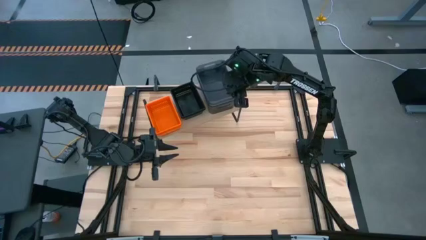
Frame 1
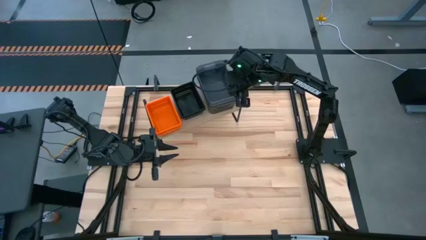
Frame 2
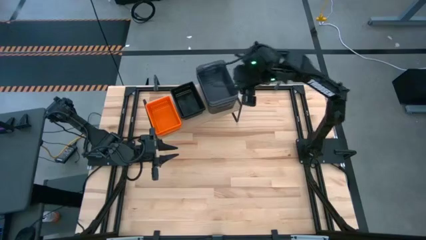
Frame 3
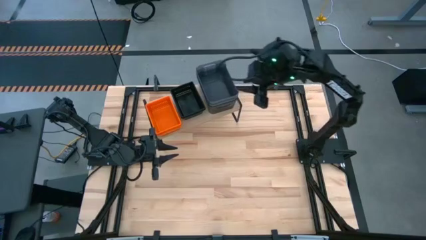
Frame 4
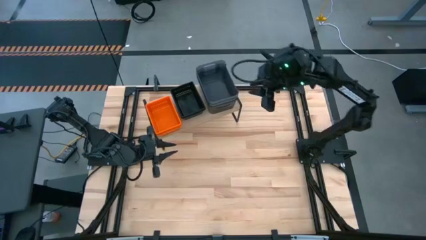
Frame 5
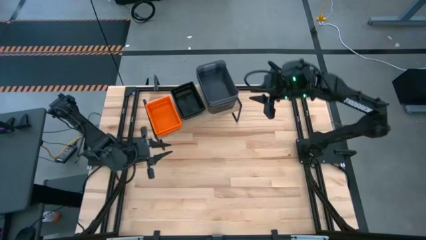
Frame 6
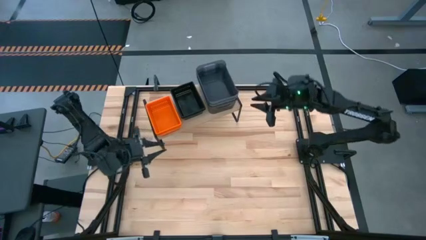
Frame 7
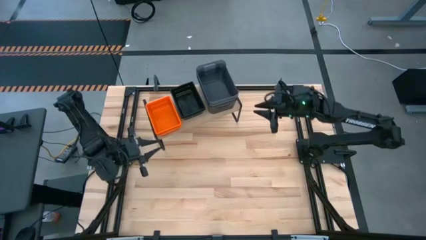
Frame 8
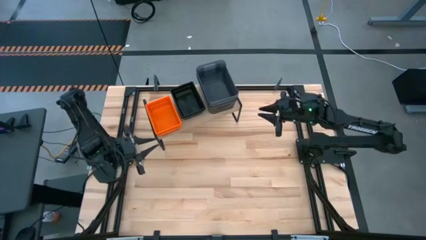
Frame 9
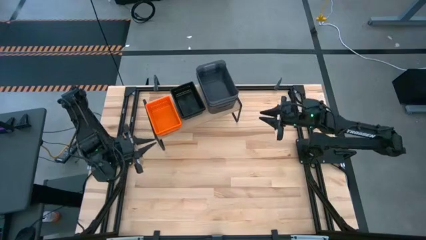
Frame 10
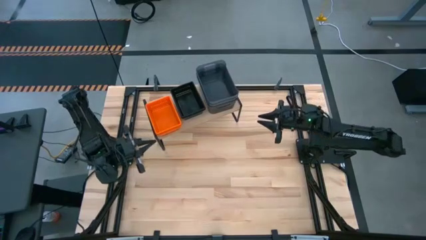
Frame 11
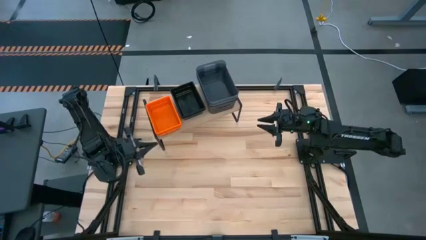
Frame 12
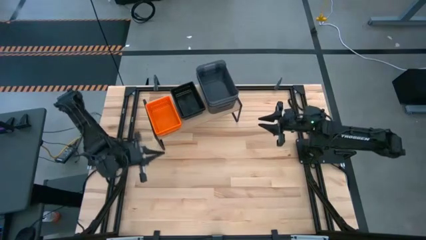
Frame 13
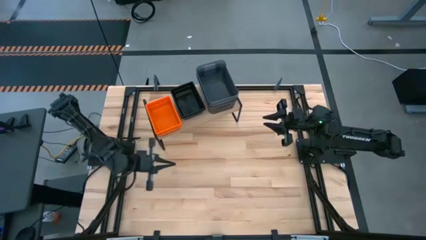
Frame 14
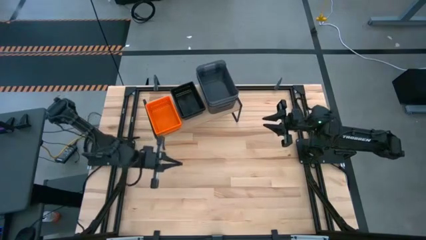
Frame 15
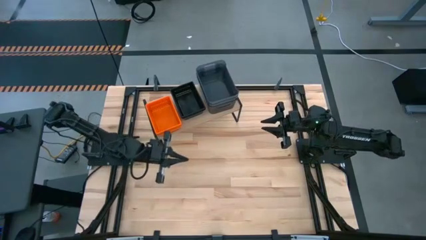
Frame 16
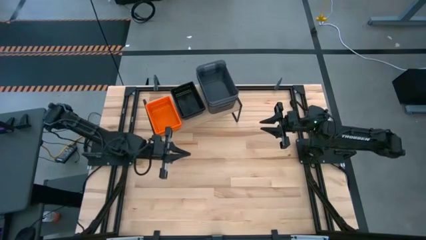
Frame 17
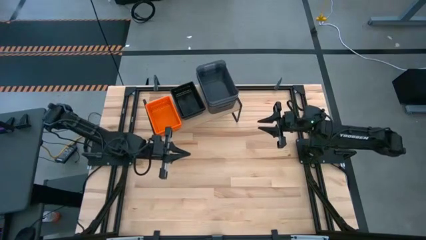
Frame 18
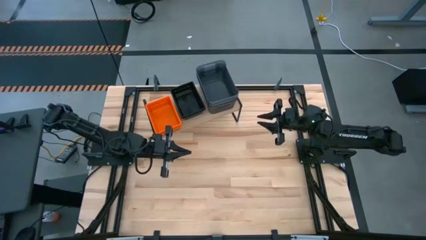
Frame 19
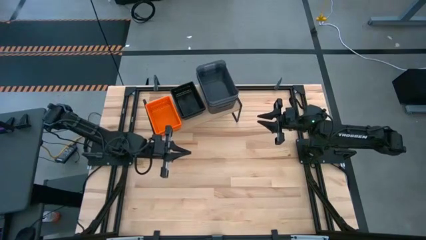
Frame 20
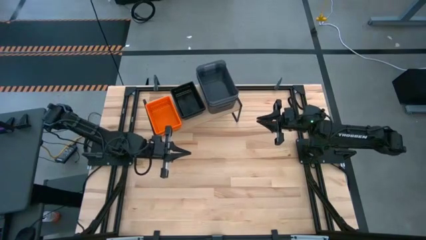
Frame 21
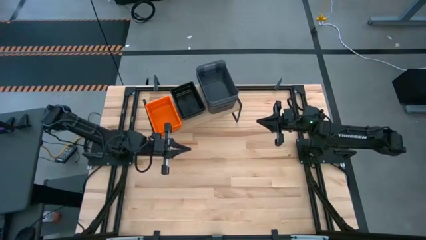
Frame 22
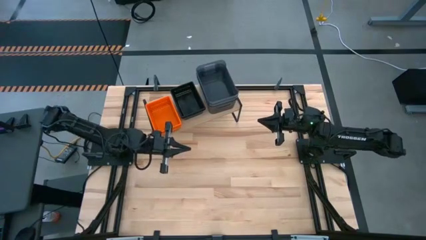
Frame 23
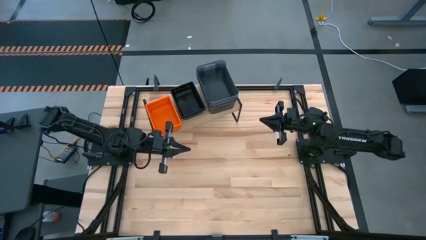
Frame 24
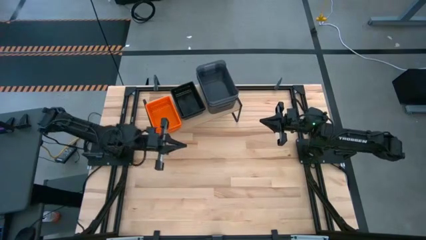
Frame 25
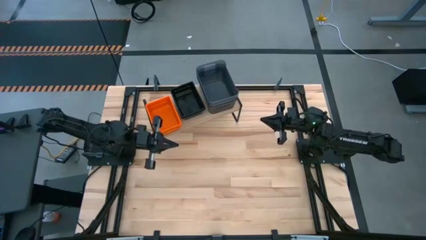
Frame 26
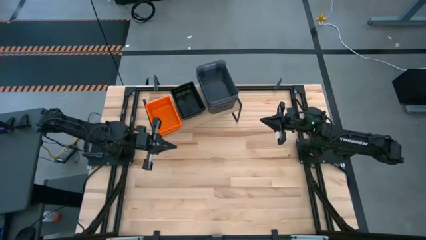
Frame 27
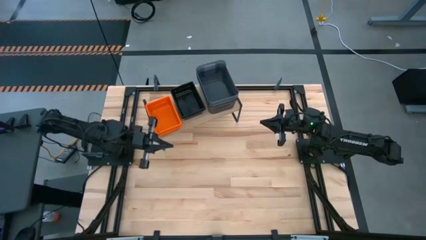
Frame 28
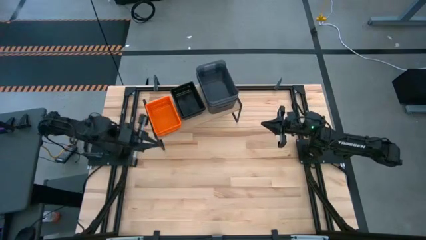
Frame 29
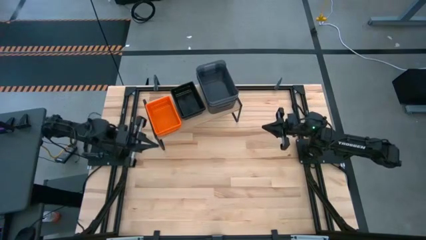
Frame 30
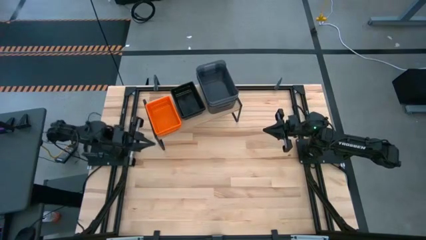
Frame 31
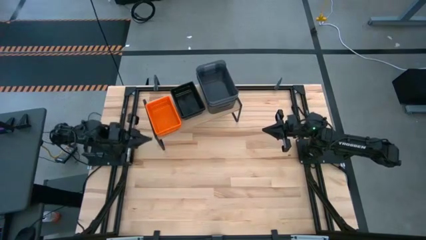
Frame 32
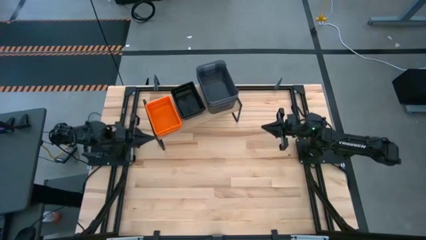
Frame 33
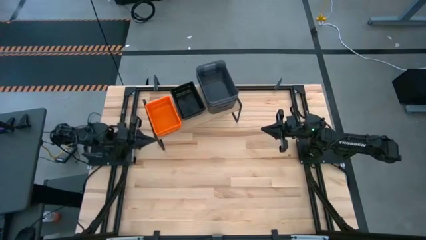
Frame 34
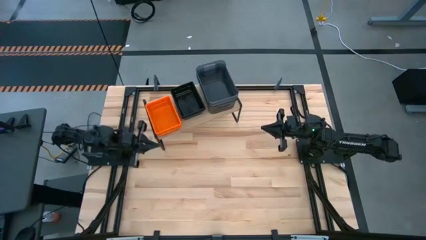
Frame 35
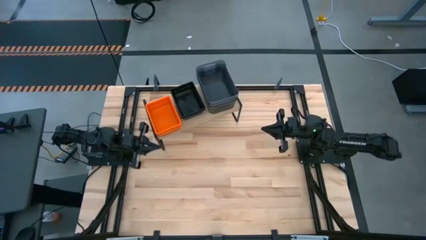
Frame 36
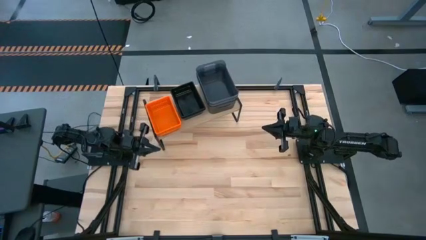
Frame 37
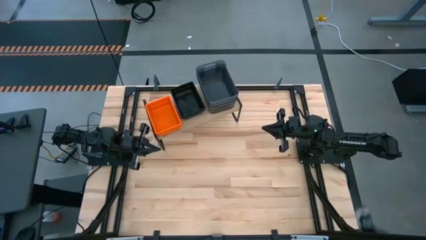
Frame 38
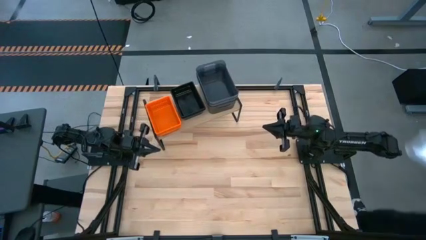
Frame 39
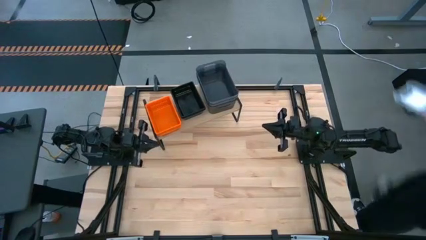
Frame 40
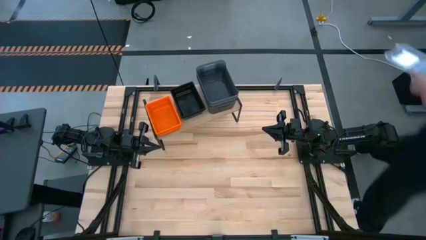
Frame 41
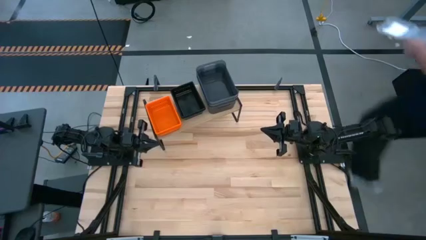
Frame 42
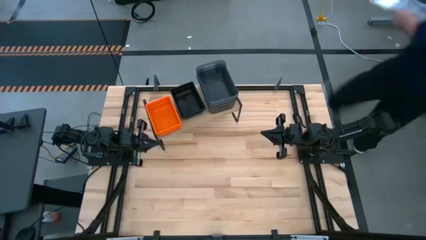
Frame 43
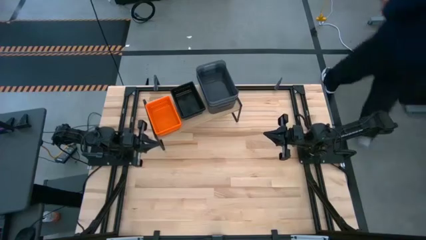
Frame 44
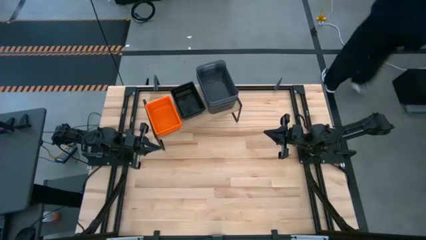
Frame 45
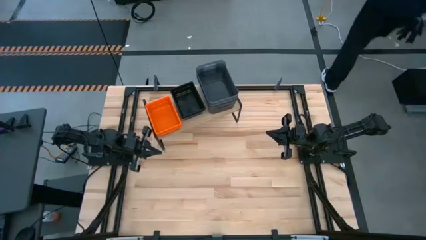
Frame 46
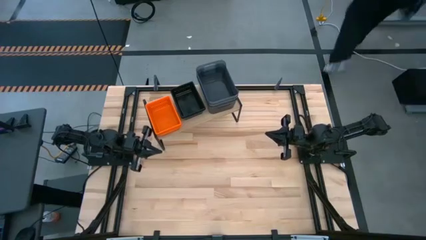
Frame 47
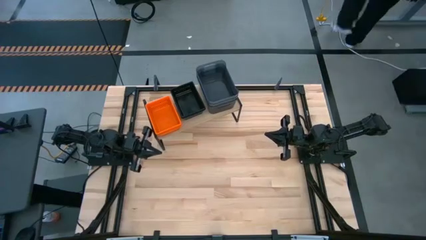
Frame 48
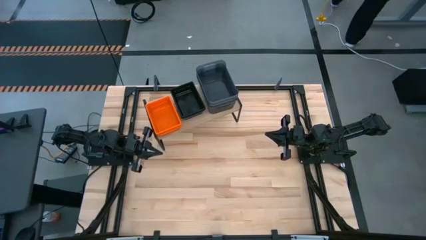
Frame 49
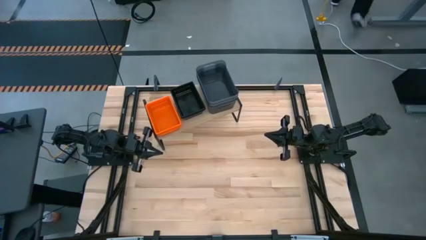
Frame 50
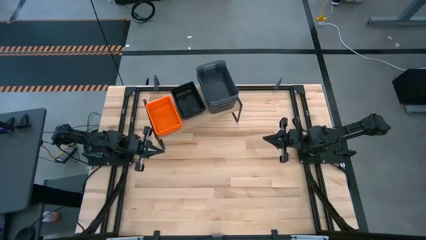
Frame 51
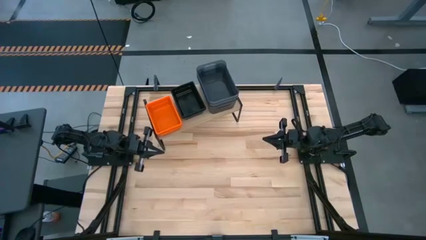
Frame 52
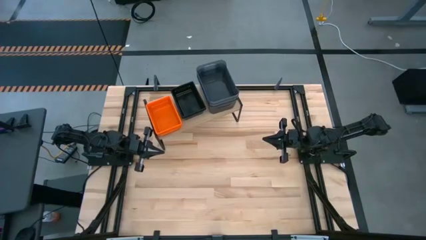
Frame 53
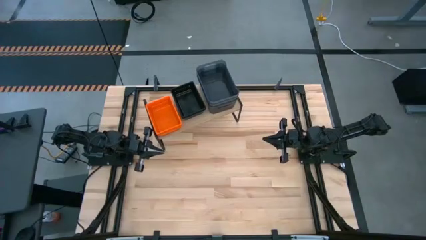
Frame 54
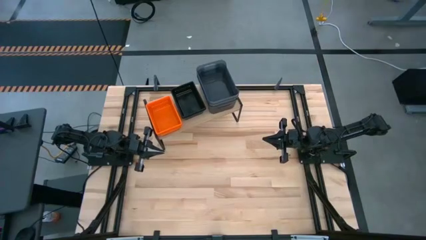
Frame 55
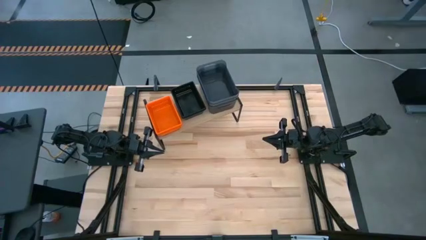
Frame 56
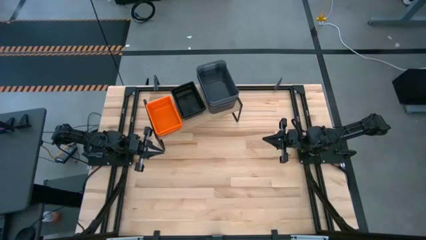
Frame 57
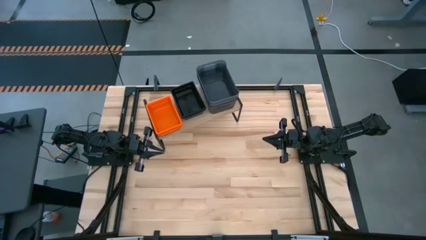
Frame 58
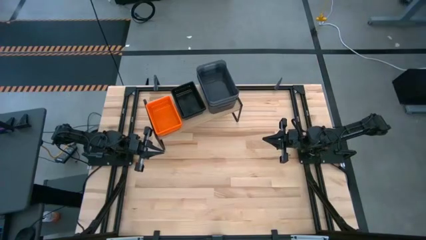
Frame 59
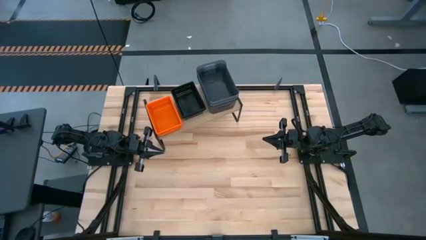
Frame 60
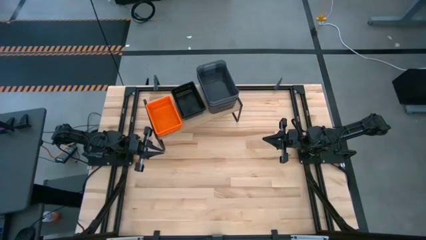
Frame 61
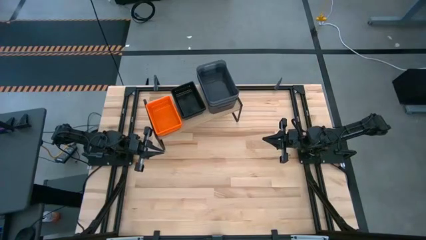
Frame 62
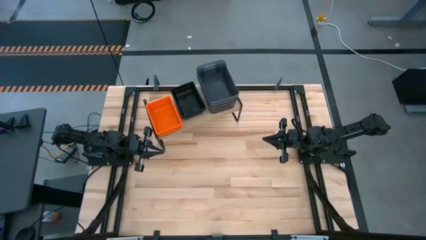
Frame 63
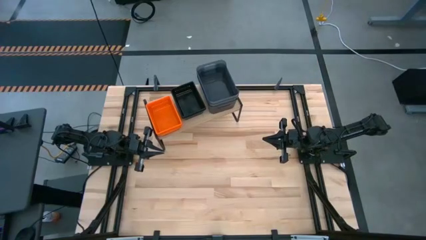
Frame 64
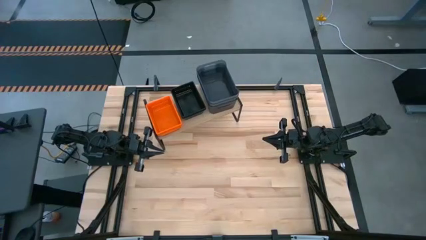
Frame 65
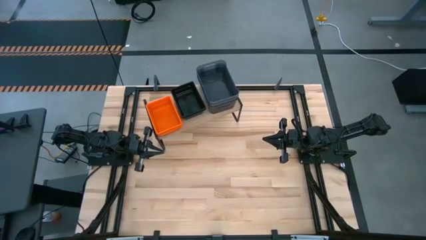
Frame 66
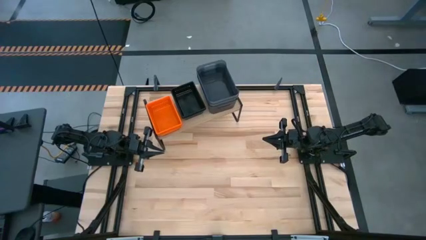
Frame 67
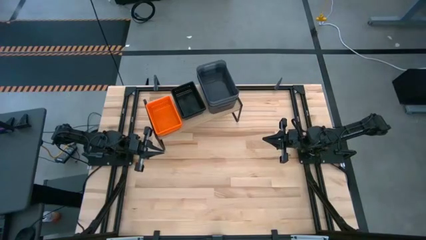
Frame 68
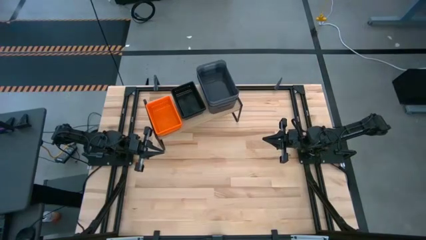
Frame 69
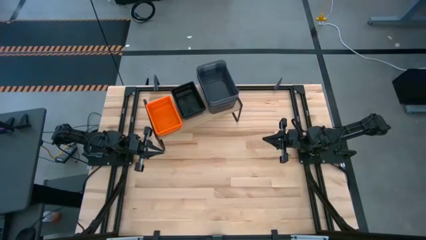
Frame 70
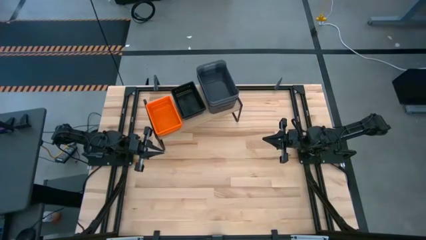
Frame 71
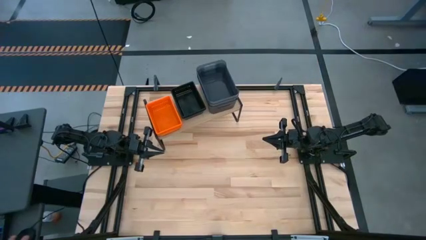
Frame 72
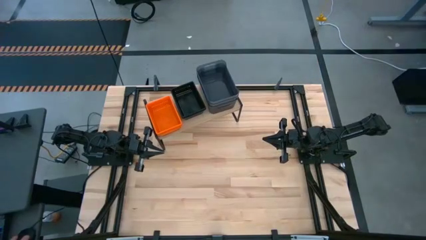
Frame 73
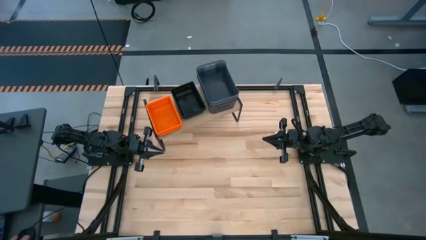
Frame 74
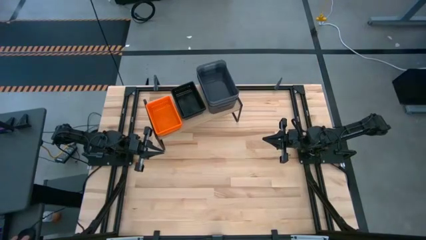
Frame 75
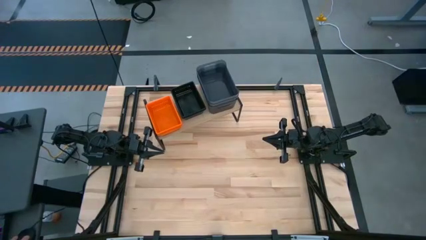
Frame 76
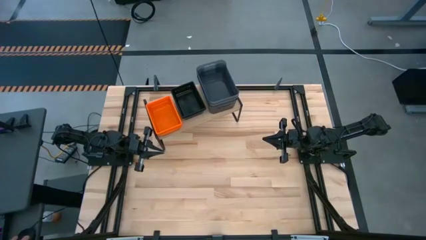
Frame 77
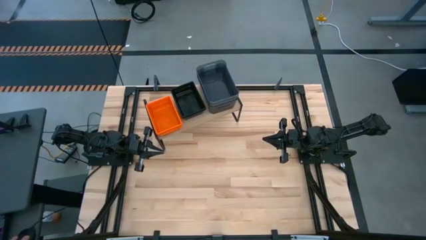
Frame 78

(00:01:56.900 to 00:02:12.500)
Task: Stack baskets on shelf by color
Return to Home Position
